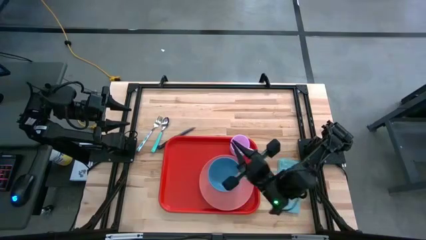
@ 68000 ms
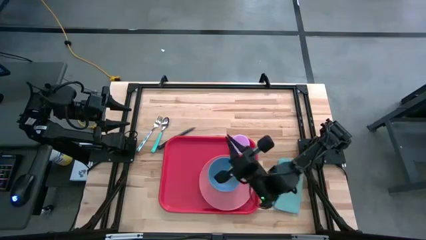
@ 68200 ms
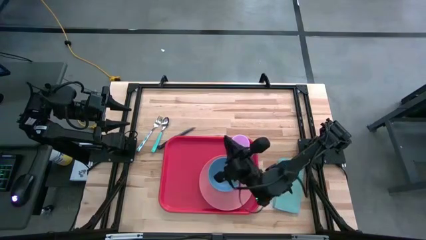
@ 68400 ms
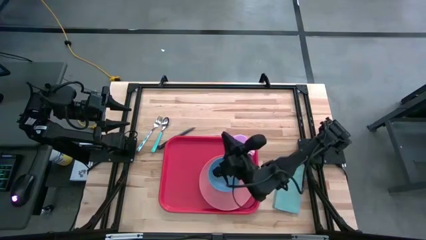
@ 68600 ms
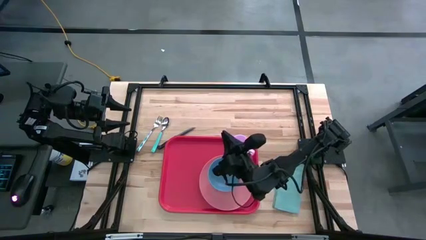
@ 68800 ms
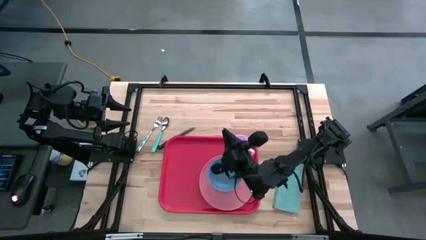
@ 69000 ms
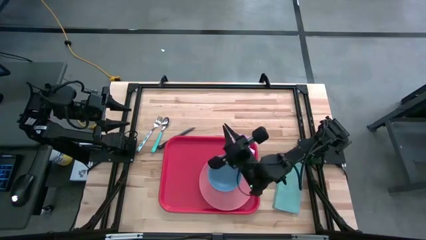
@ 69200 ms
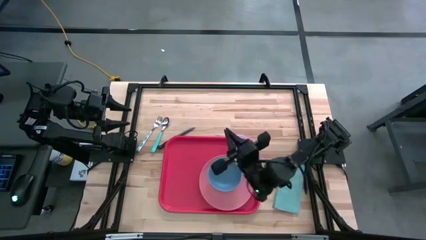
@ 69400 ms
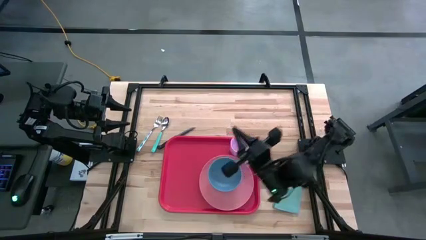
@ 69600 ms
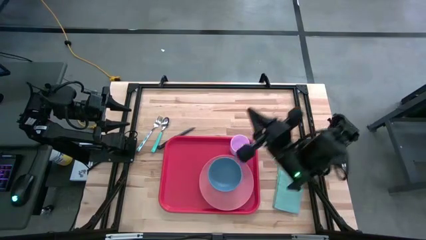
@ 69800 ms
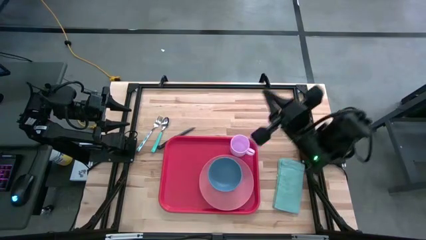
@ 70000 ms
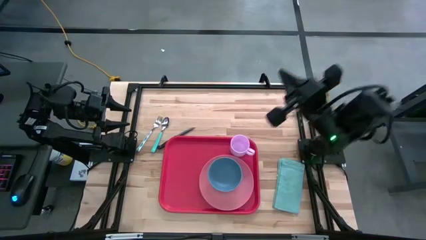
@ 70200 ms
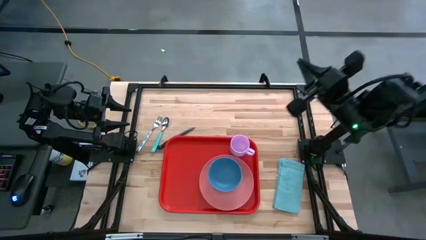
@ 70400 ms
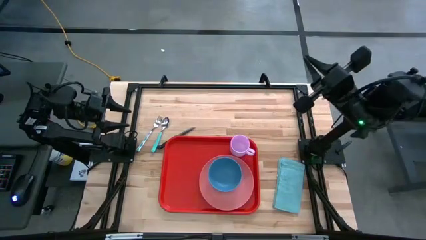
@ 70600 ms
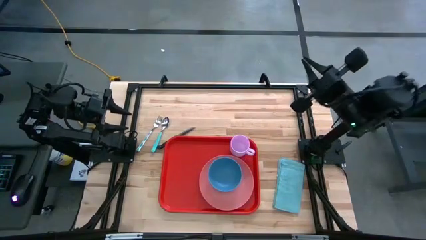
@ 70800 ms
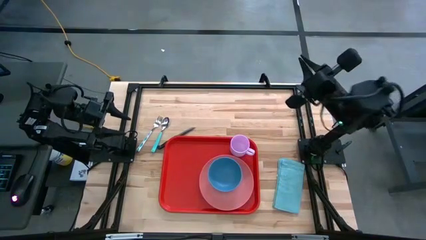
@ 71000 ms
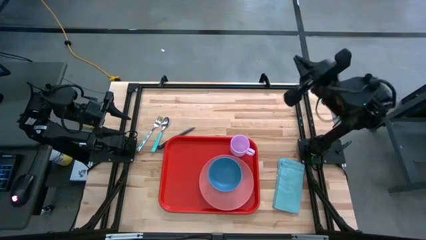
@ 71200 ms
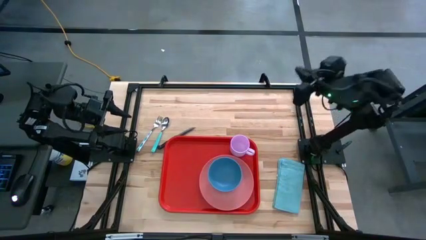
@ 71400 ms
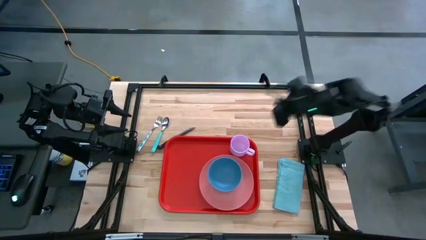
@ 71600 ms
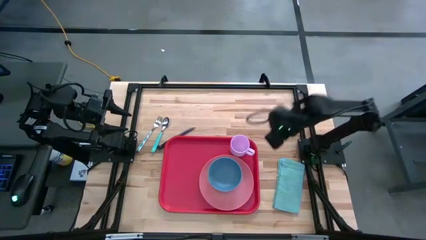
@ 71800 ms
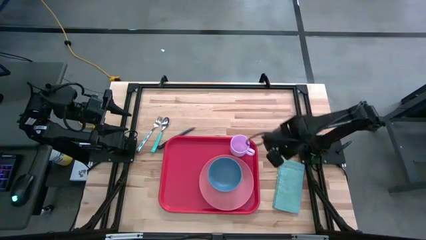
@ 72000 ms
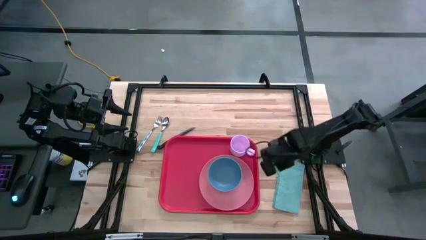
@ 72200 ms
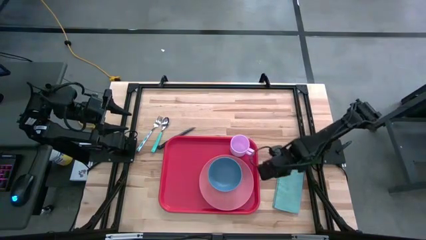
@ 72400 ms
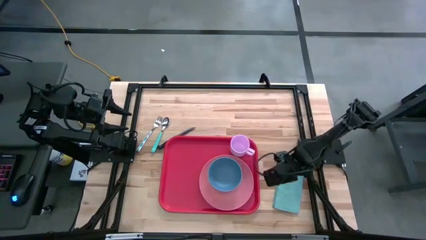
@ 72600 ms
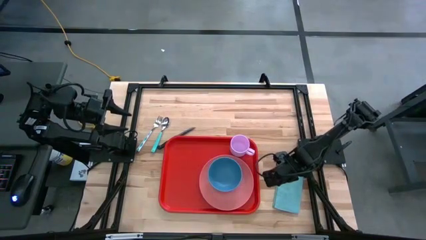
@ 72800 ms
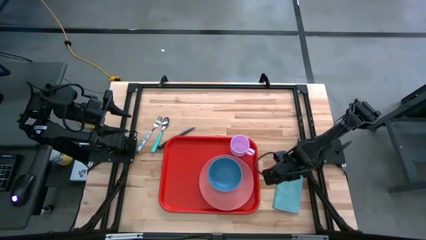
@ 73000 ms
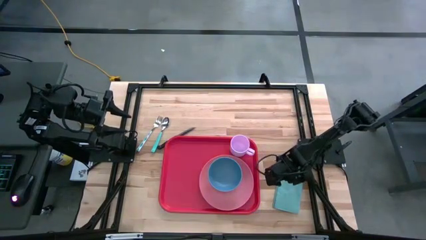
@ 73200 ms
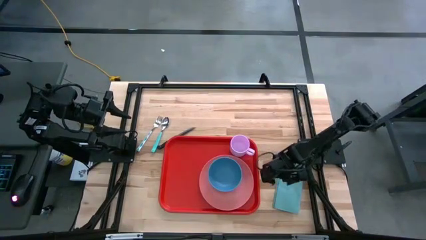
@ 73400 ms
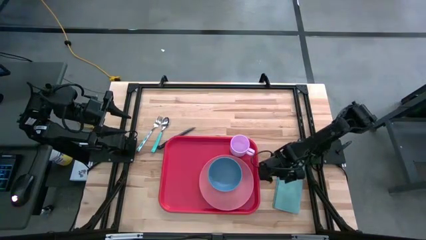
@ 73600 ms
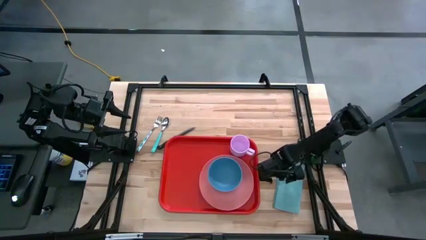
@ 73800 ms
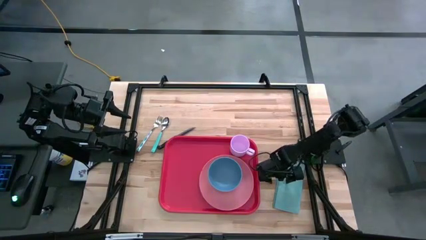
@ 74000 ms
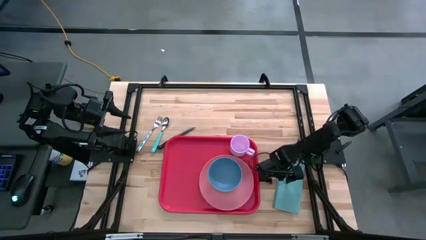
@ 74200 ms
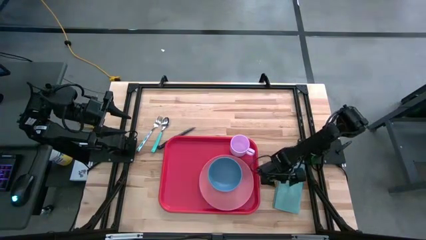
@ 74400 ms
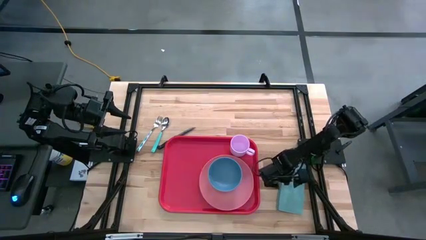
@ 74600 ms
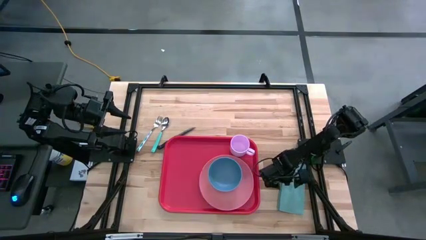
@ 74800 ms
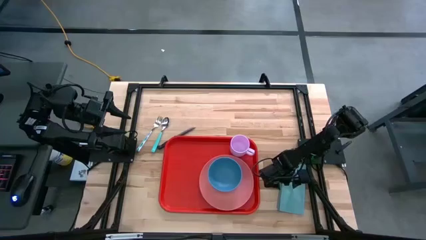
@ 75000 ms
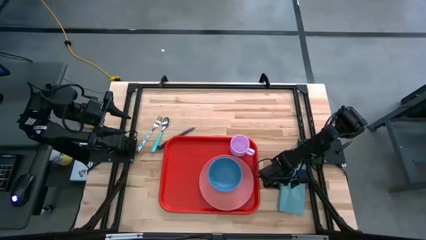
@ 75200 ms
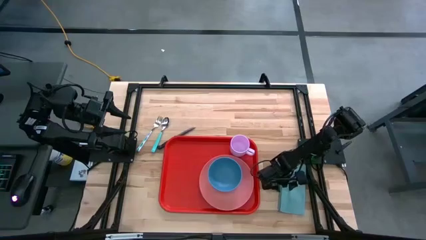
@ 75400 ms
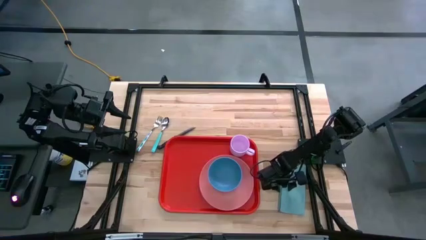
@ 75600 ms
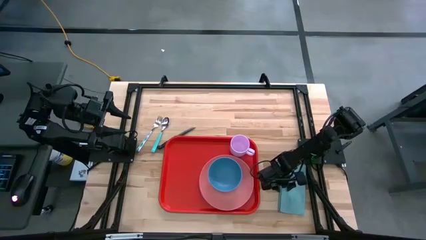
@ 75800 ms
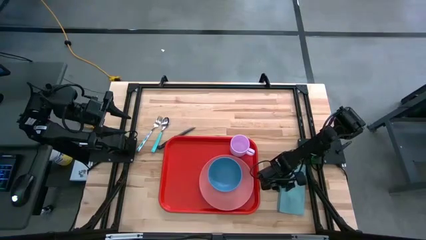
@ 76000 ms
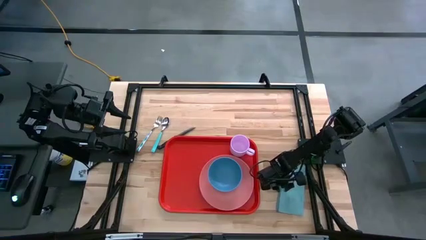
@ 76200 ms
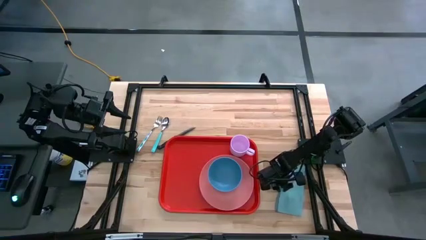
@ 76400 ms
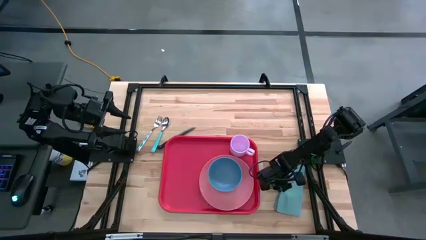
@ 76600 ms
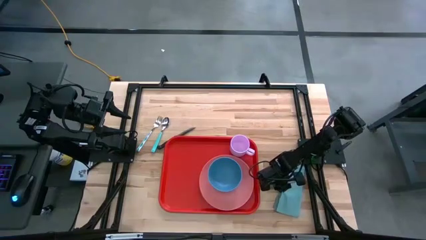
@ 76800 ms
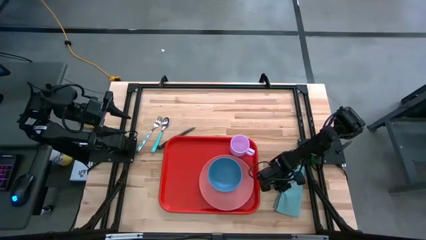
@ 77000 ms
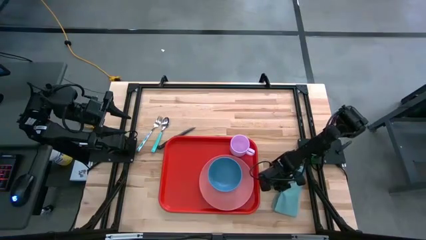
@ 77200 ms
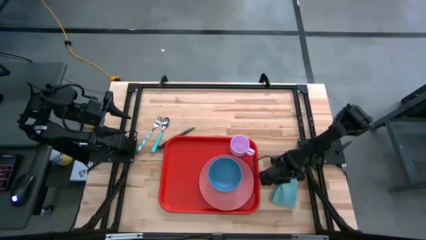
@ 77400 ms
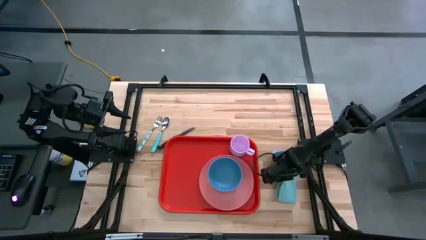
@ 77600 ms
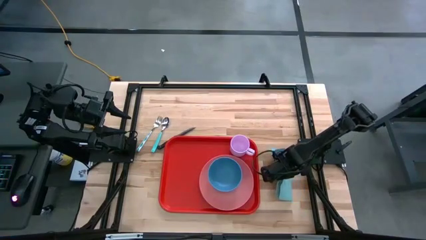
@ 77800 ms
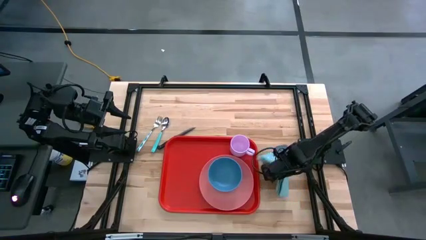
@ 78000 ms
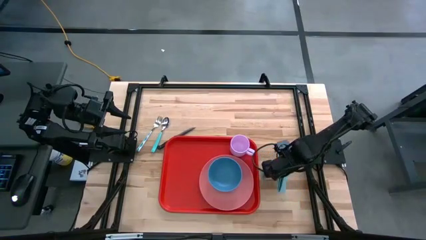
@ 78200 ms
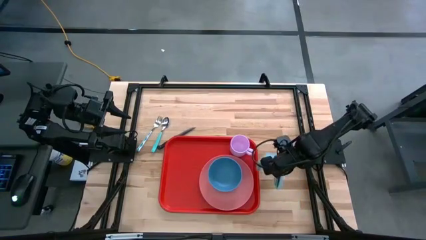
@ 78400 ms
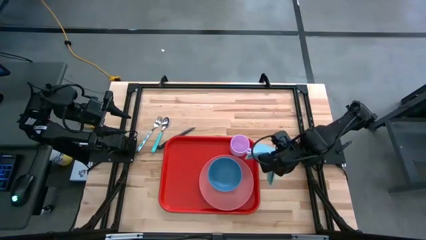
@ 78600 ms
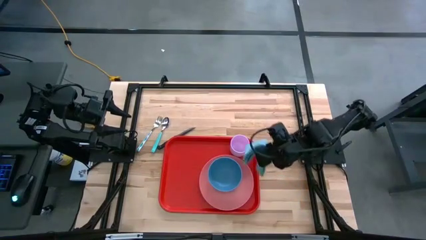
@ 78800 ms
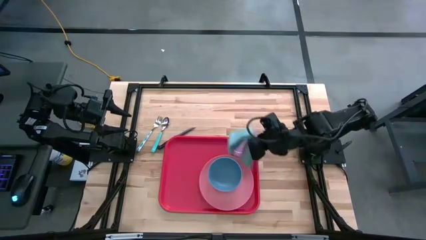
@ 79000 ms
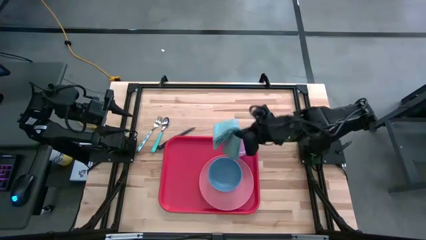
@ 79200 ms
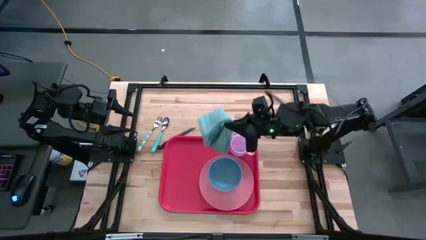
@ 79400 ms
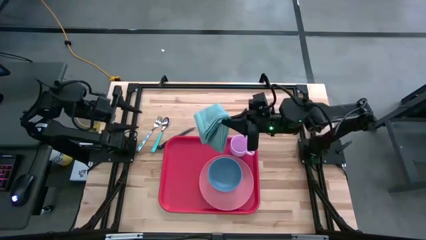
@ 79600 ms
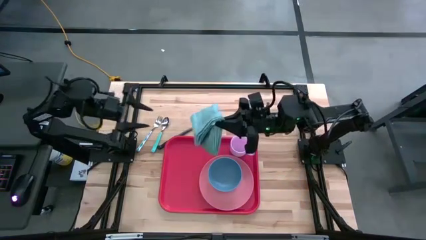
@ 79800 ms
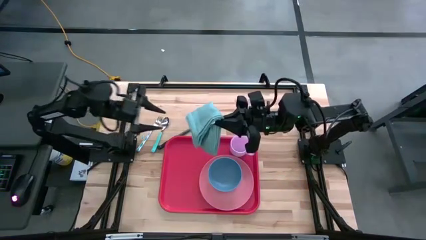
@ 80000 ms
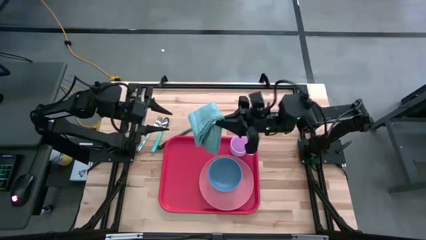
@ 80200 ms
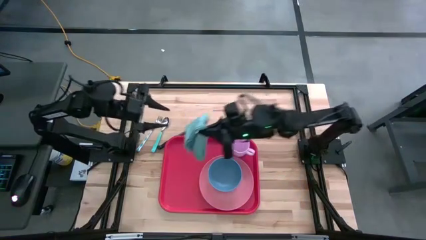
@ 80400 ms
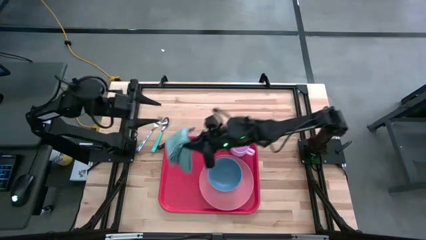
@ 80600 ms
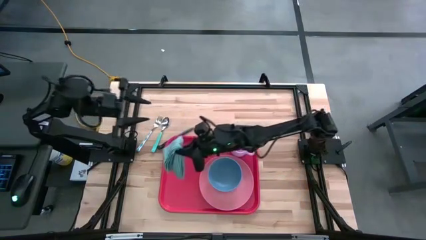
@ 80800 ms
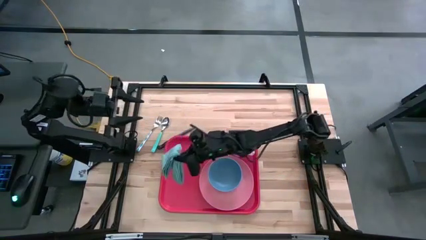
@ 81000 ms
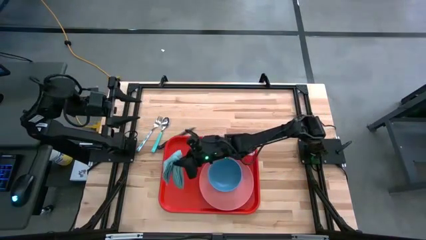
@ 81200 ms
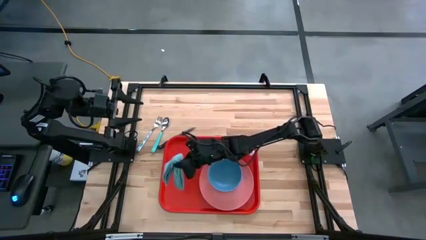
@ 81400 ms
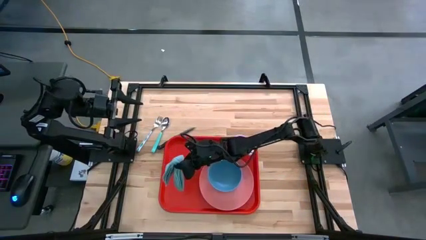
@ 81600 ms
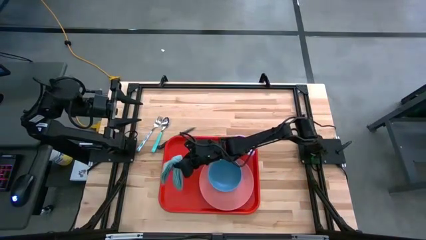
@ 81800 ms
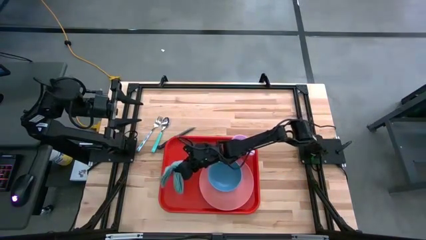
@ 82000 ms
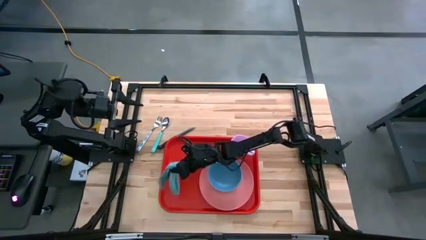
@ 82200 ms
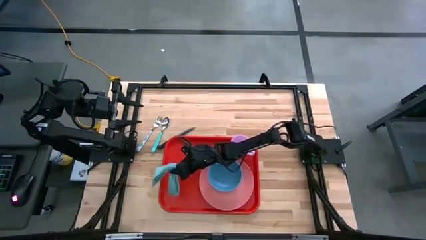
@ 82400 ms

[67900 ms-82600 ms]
Task: Set up tray
Put the blue napkin into the pink serving tray
